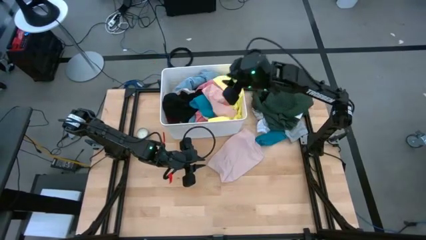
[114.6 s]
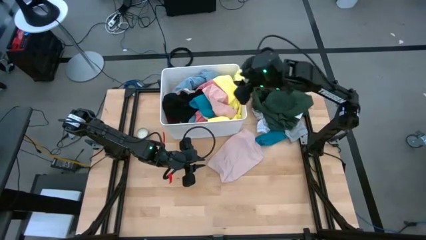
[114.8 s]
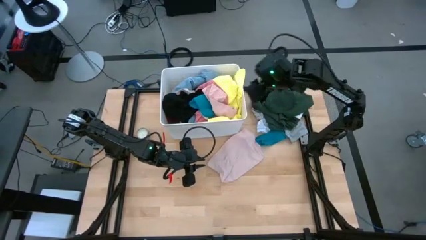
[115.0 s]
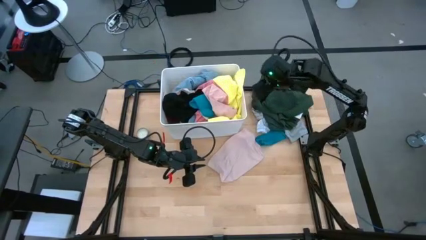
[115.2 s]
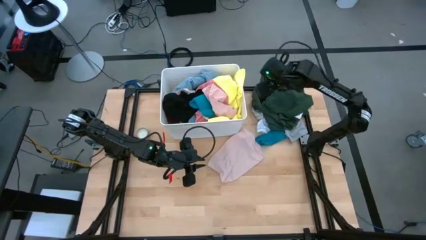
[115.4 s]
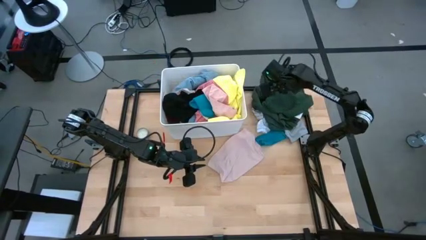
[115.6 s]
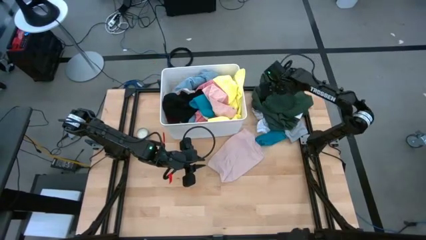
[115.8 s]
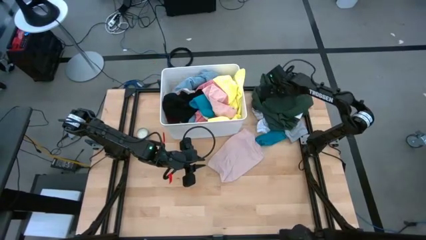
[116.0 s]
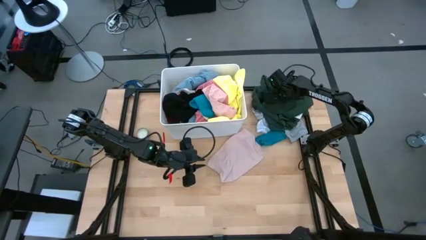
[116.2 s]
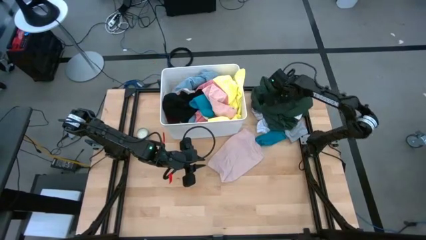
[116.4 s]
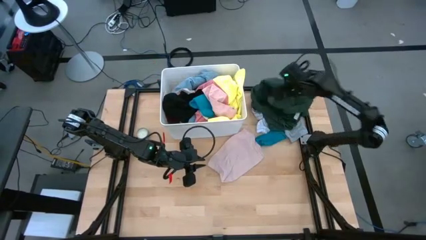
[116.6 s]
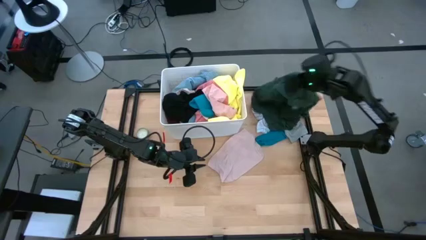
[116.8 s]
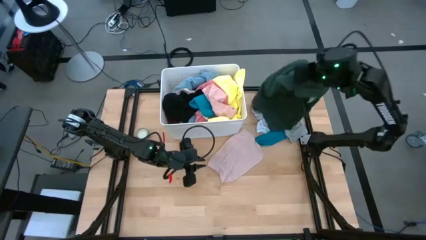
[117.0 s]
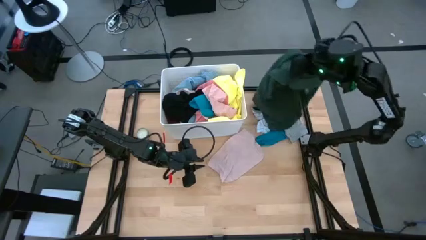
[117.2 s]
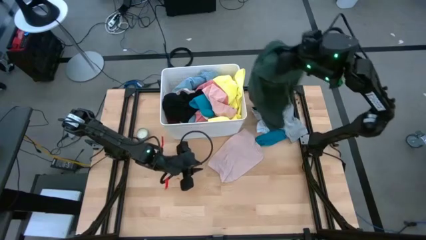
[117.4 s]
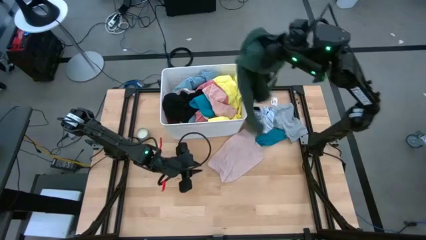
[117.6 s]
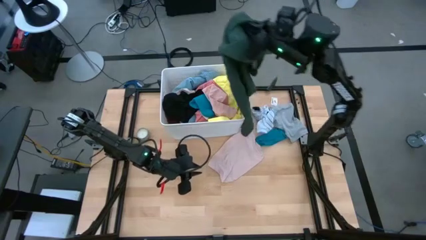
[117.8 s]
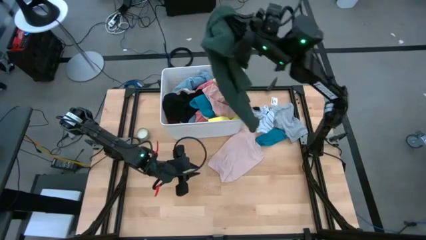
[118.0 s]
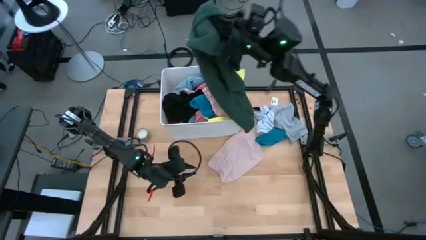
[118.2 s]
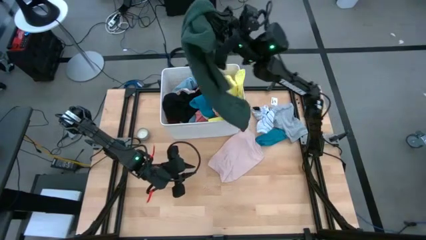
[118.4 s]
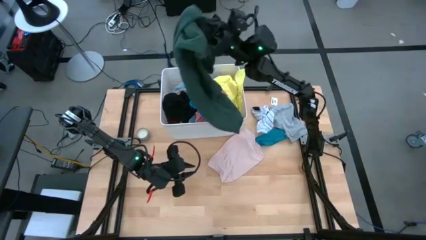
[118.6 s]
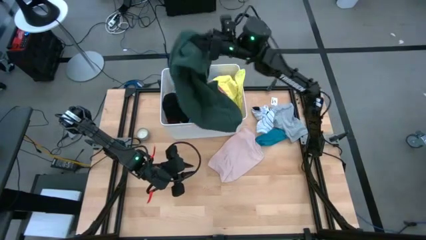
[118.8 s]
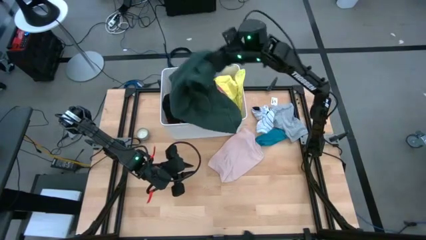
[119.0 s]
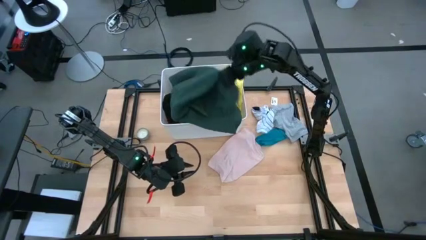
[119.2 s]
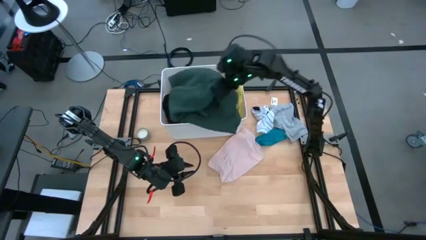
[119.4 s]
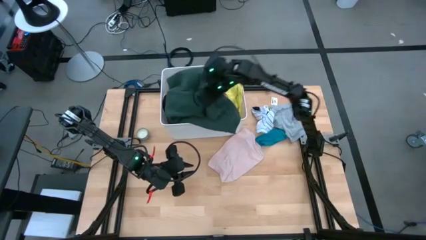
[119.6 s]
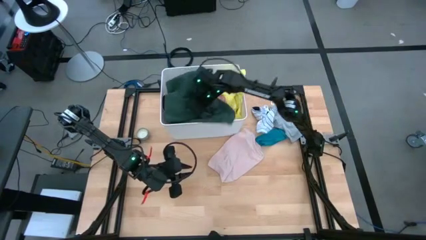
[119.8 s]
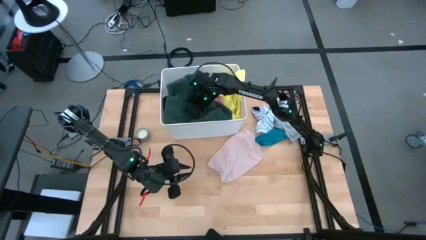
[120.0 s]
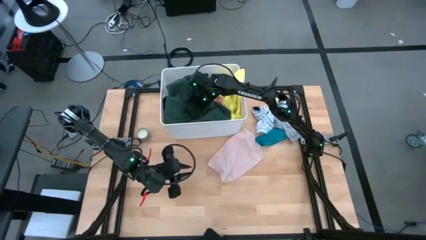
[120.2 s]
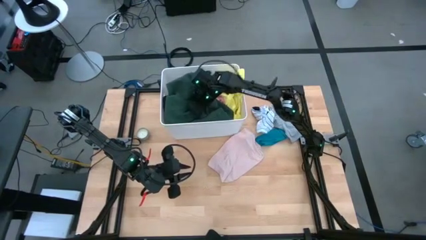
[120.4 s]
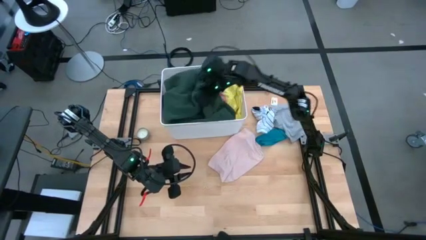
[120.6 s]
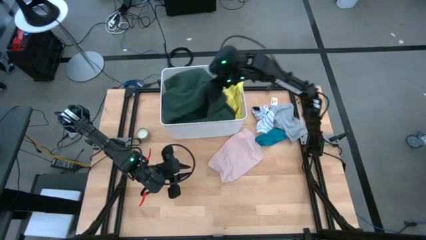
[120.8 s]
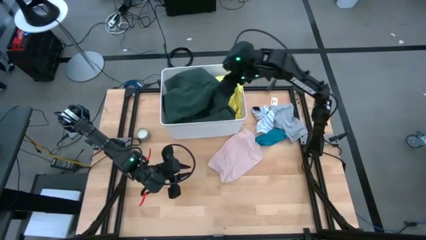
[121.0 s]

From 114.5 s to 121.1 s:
Task: Sort clothes
Put the dark green jacket into the laundry bin

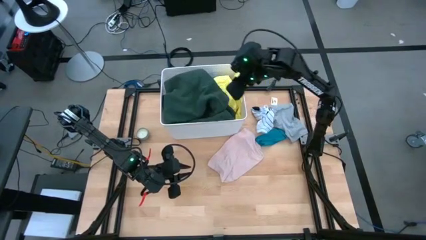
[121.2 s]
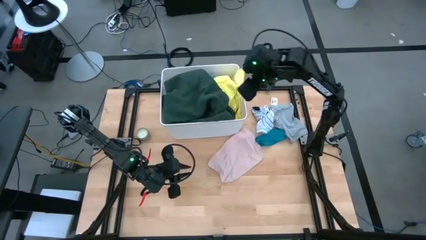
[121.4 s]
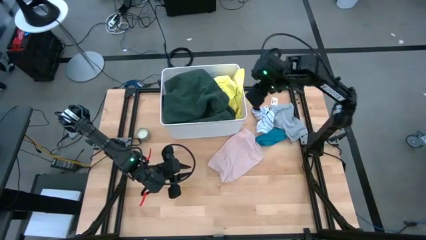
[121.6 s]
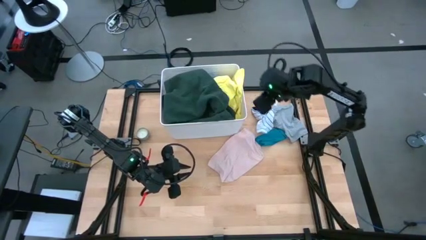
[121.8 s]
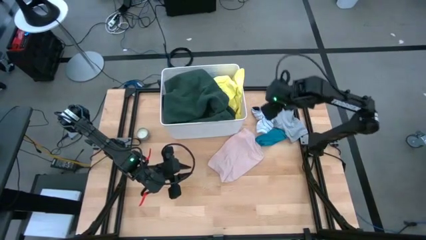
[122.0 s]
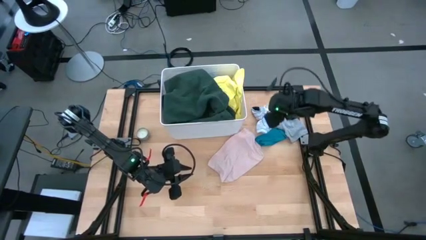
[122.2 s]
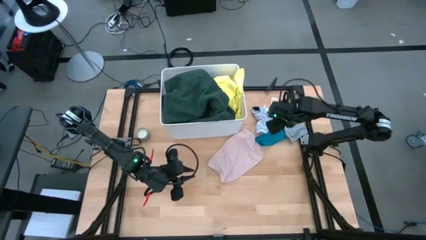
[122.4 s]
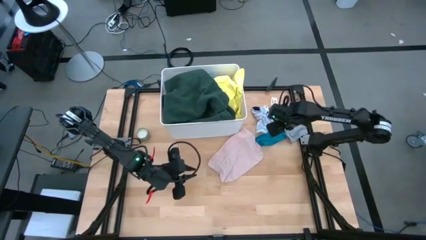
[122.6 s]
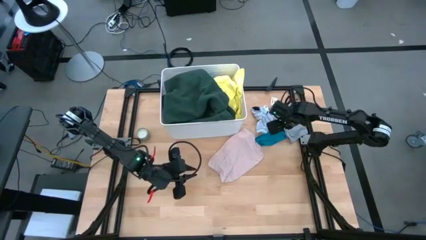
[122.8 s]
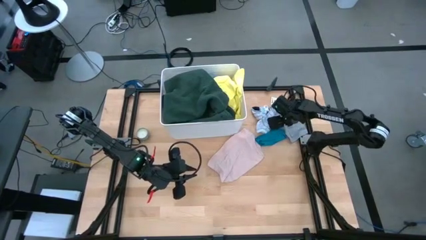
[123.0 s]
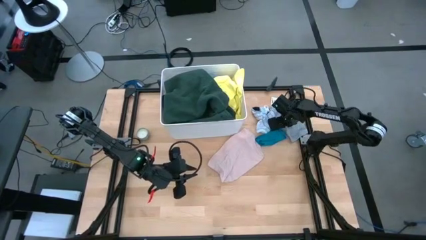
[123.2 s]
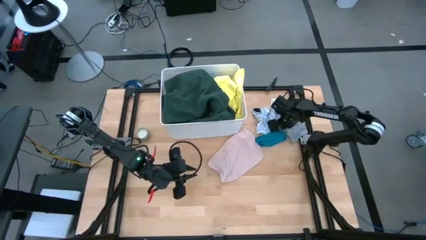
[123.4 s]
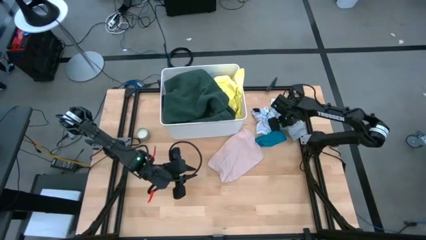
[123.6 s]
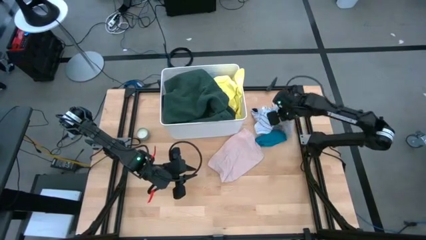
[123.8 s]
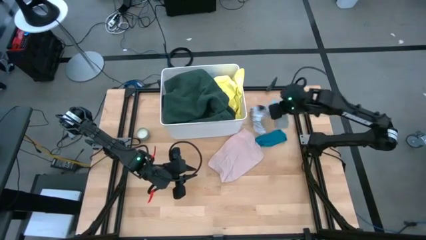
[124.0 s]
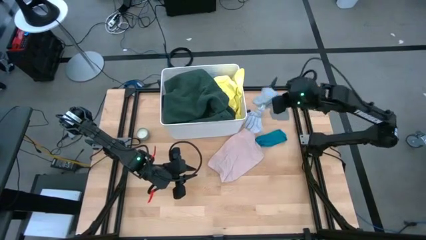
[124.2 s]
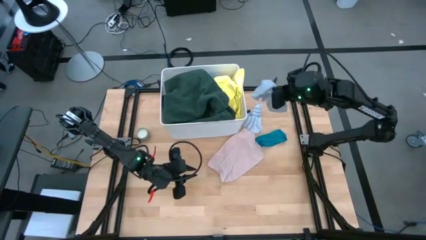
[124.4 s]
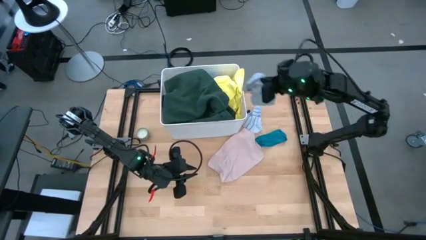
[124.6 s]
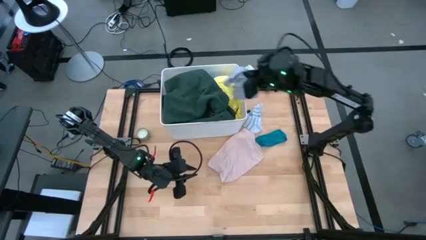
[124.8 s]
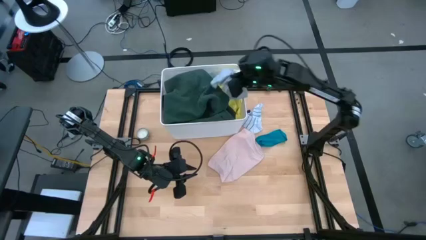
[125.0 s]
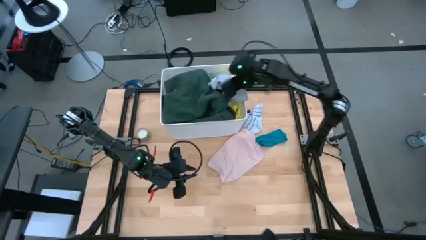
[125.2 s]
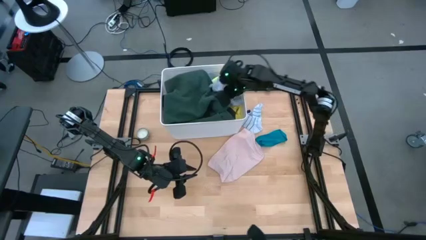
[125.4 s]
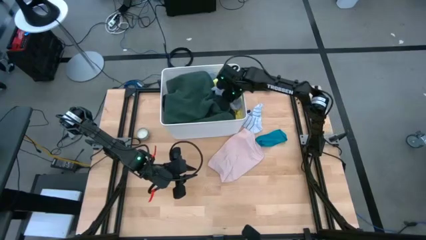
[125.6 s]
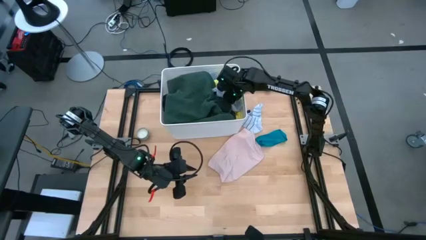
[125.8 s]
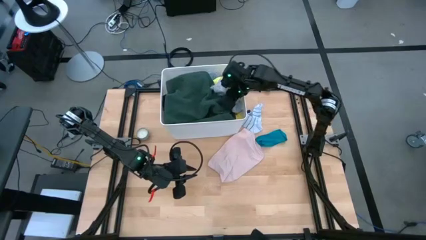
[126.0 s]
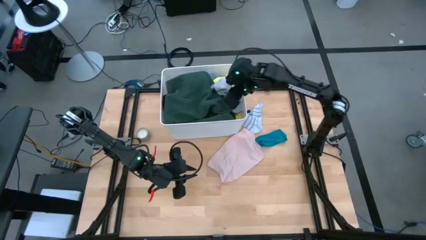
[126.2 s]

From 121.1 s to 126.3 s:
Put the gray short into the laundry bin

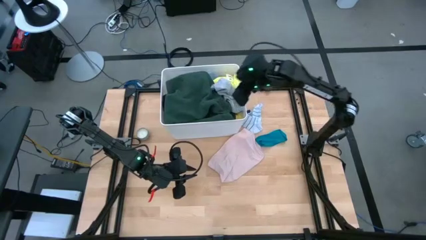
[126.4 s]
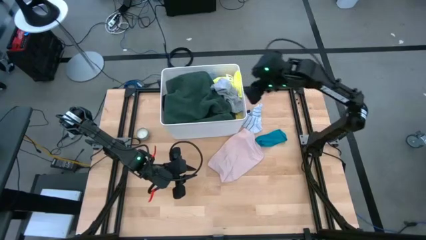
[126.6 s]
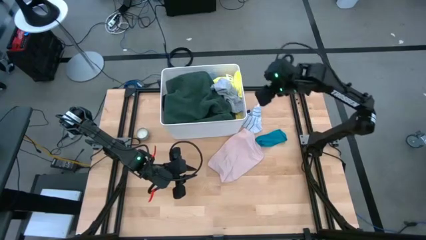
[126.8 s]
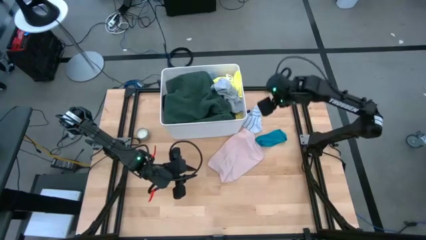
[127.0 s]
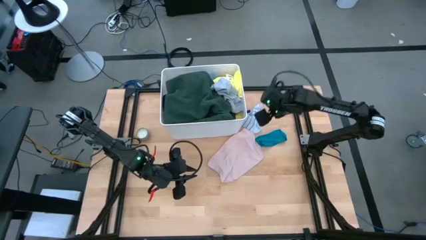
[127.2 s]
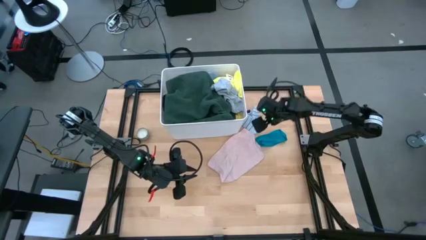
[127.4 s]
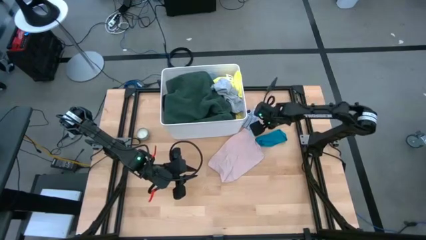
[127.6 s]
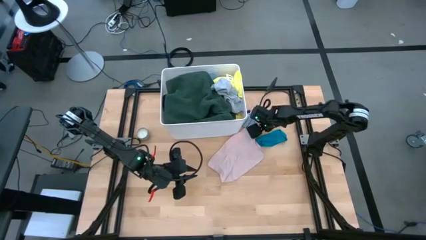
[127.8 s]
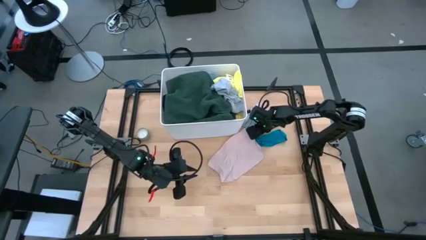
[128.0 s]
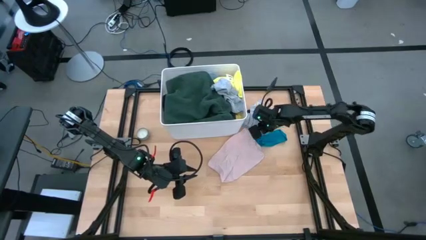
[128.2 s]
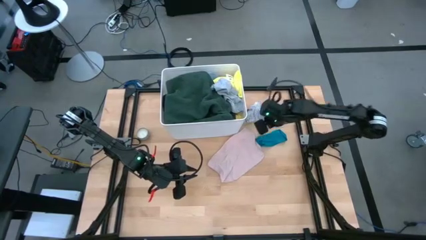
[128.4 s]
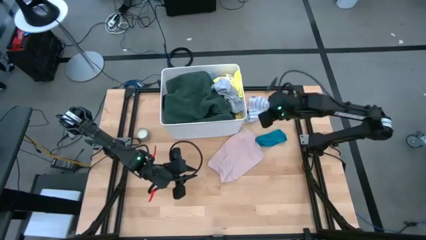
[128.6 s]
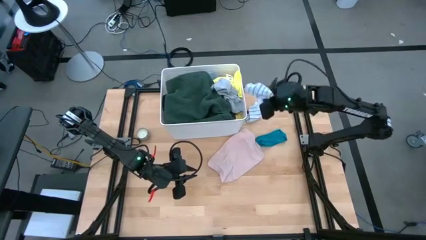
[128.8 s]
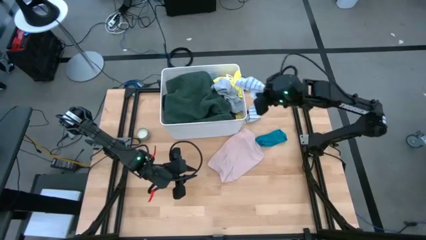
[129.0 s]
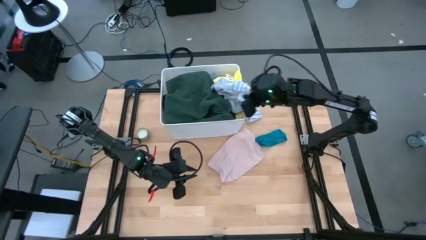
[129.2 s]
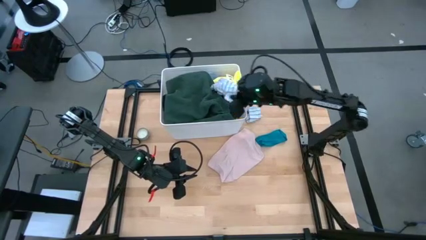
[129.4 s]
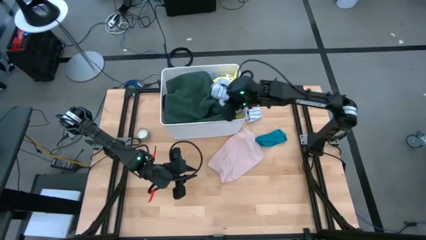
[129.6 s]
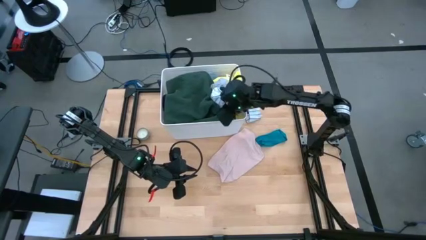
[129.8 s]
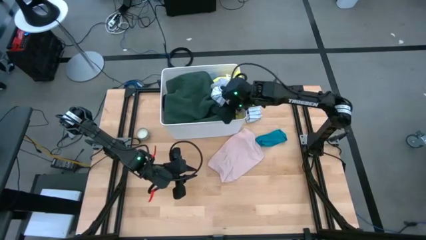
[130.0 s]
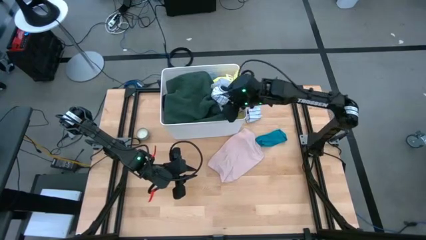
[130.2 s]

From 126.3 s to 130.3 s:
Put the white patterned sock into the laundry bin
